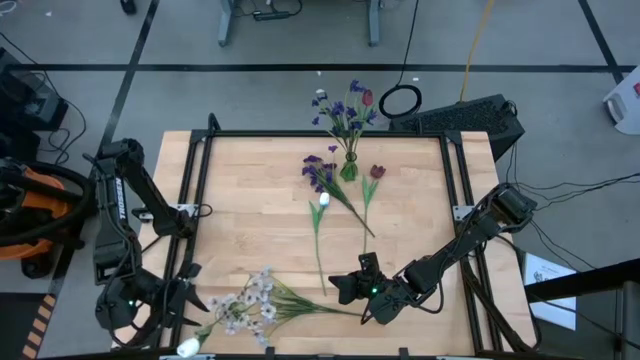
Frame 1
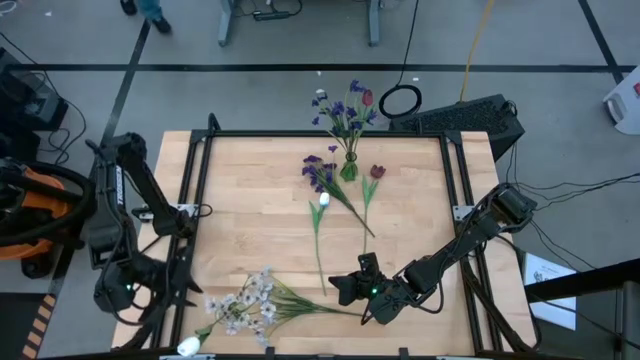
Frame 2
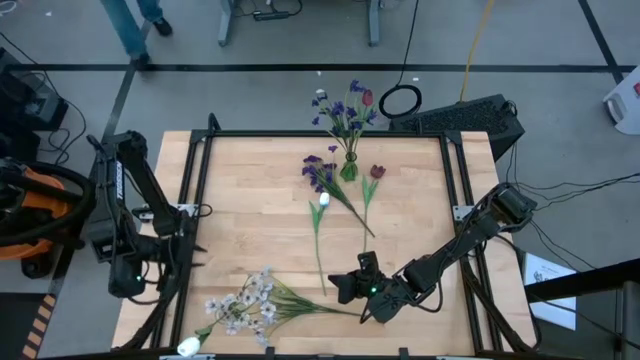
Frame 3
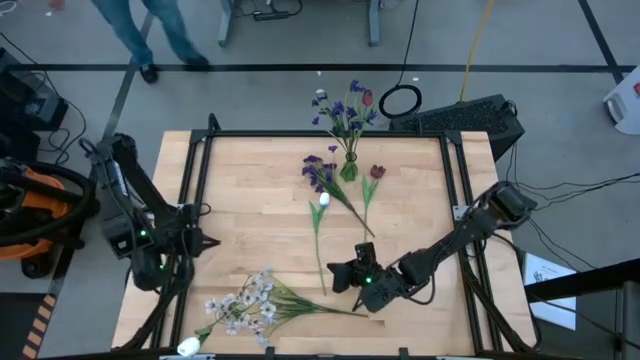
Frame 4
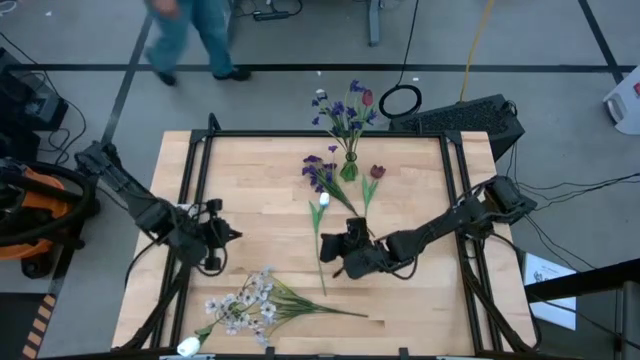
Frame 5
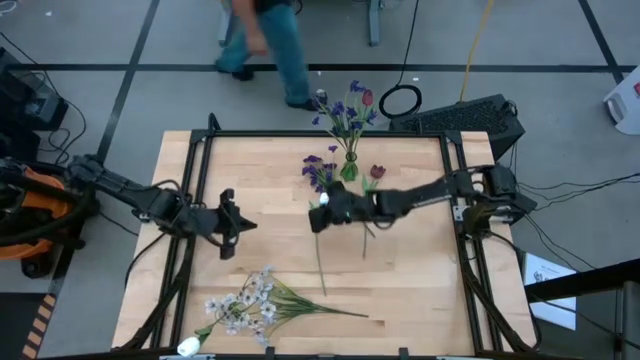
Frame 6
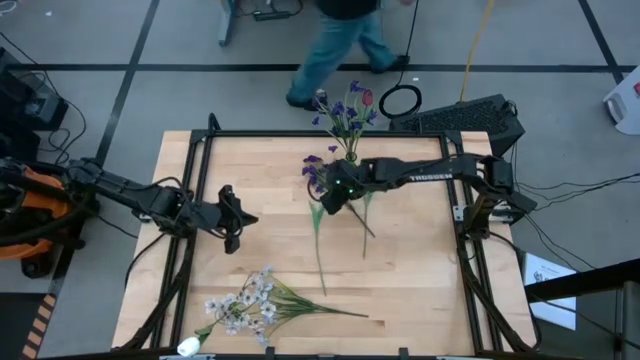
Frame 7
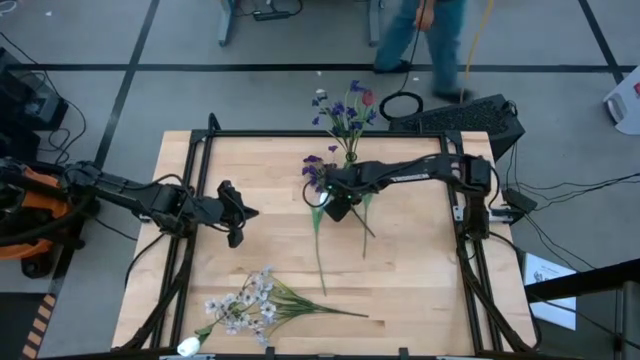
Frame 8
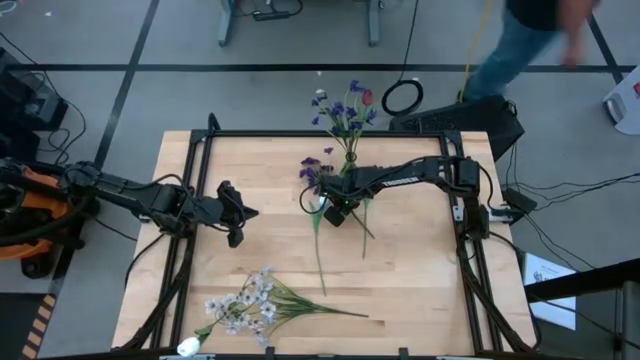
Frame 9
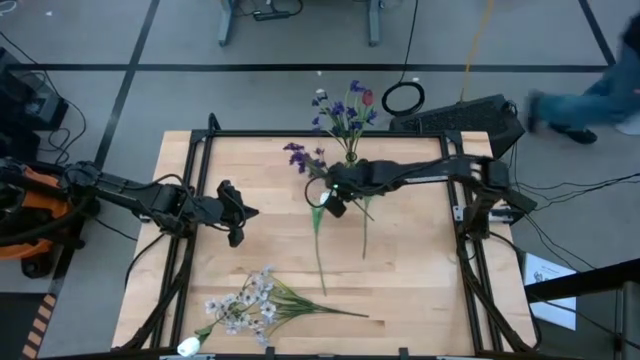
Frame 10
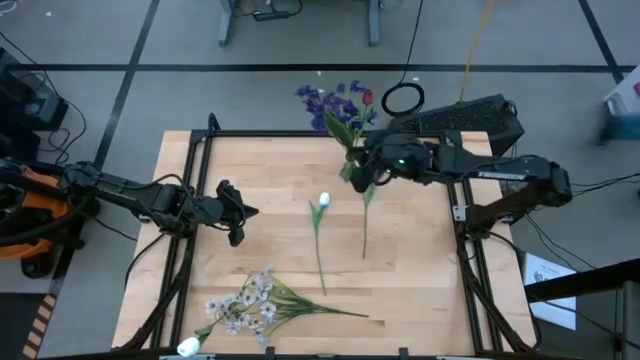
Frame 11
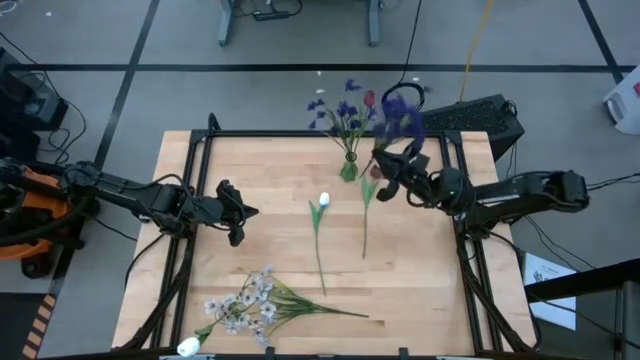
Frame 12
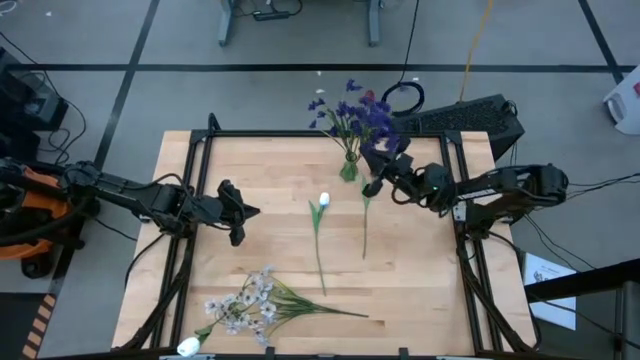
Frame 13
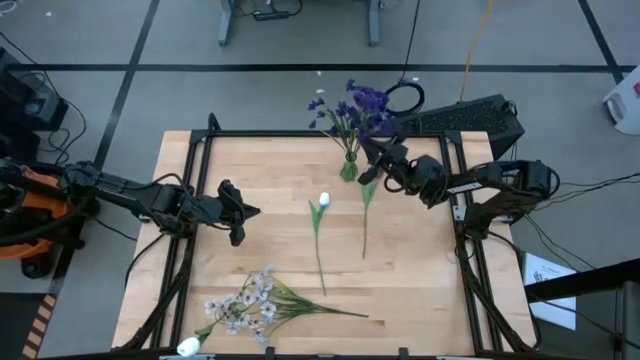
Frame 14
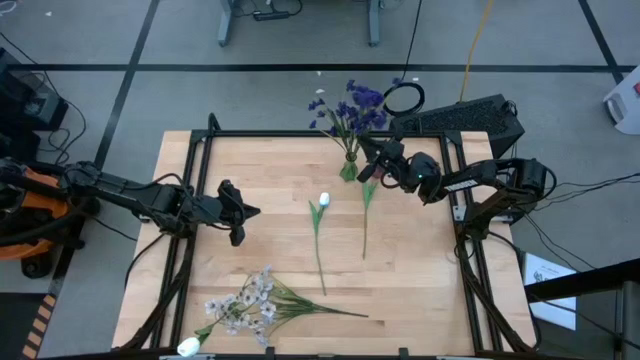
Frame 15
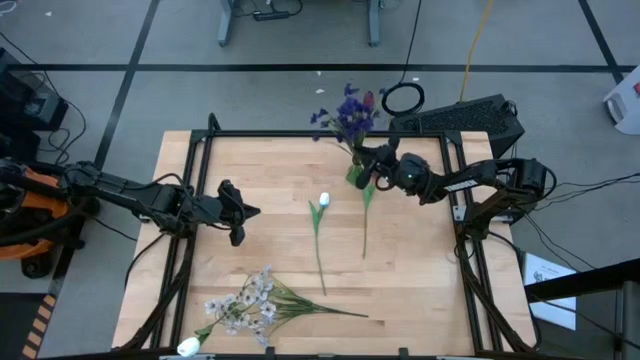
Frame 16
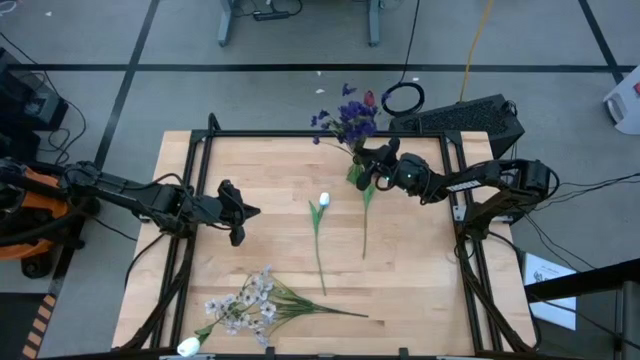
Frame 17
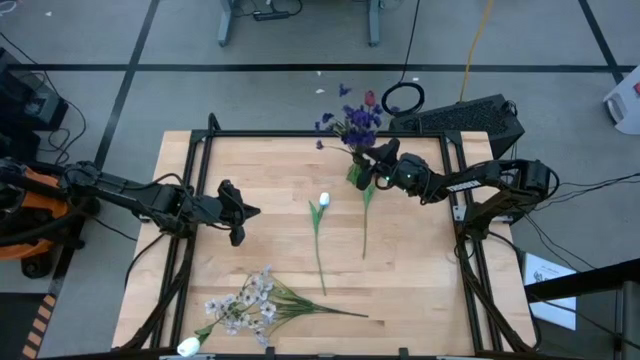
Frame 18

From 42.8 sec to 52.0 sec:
Task: Sort flowers into vase by color
Put the top violet flowers into the green flower vase

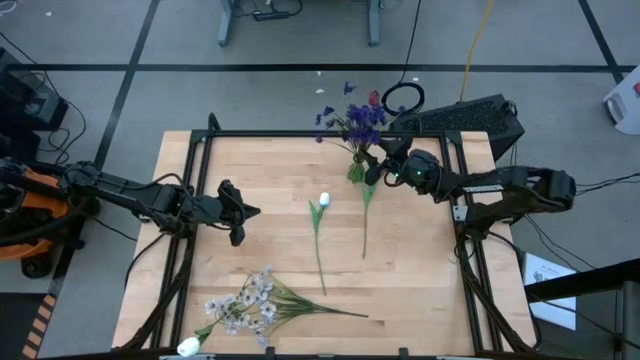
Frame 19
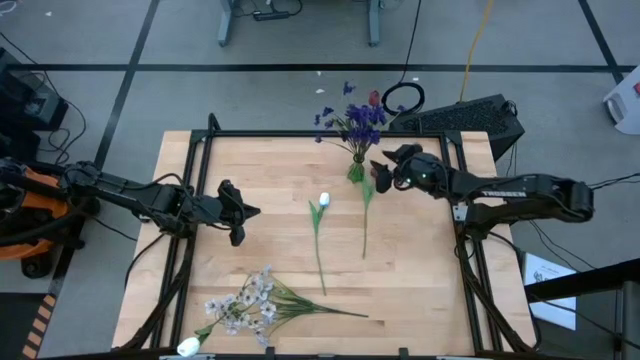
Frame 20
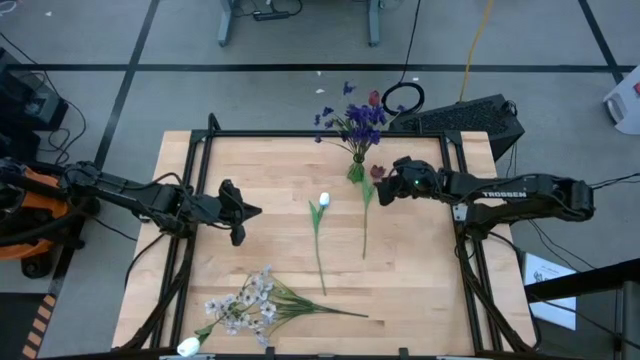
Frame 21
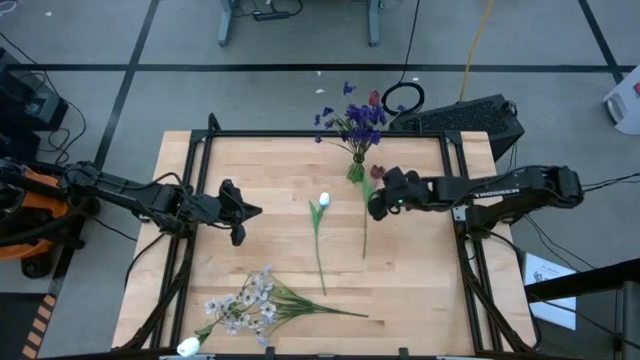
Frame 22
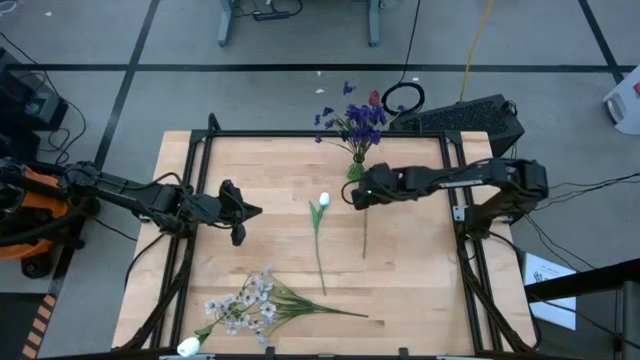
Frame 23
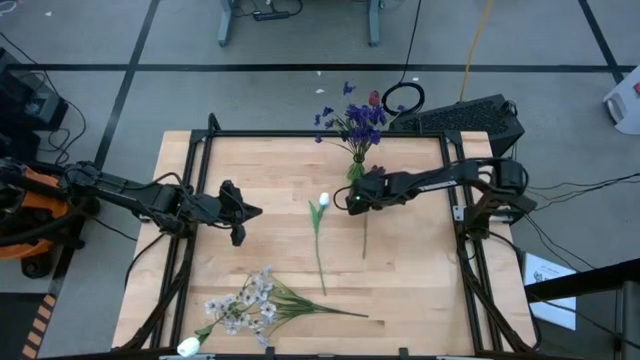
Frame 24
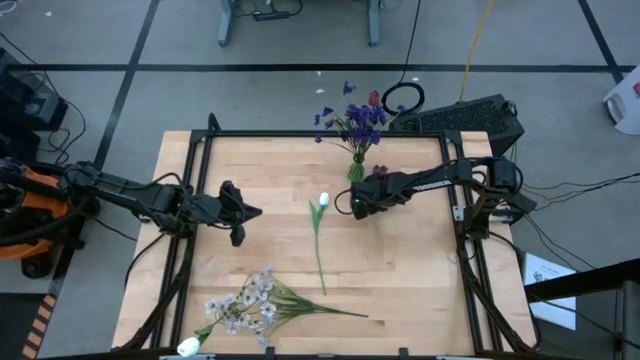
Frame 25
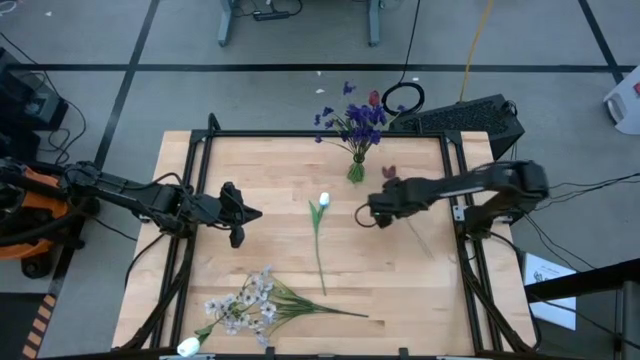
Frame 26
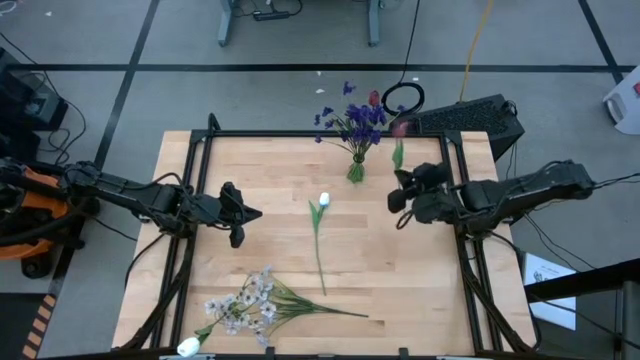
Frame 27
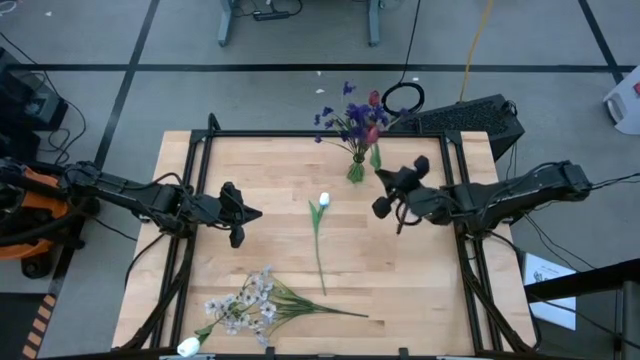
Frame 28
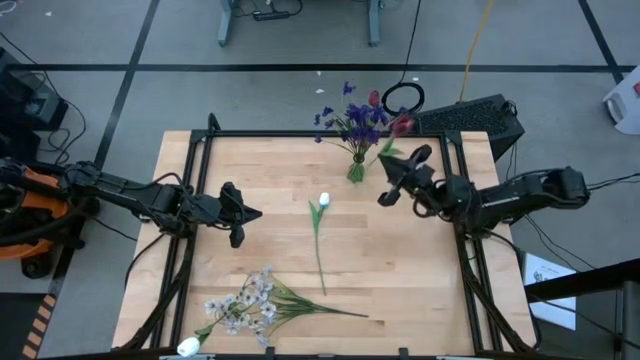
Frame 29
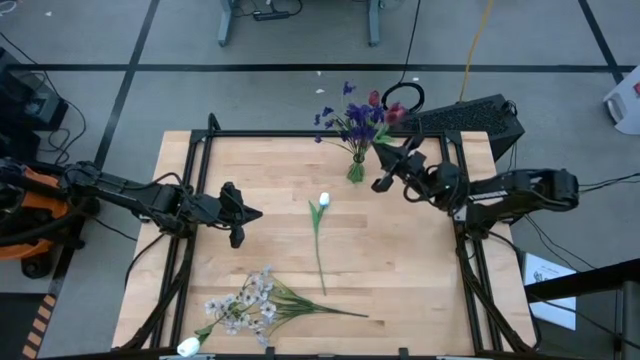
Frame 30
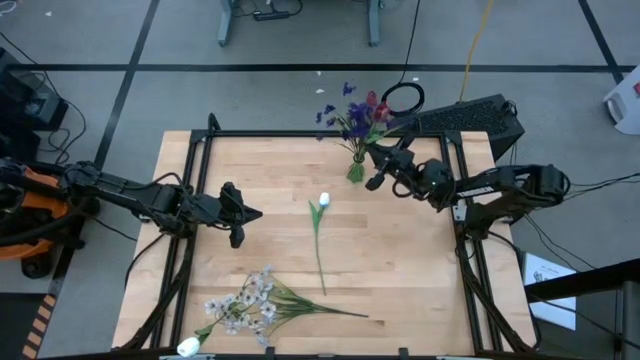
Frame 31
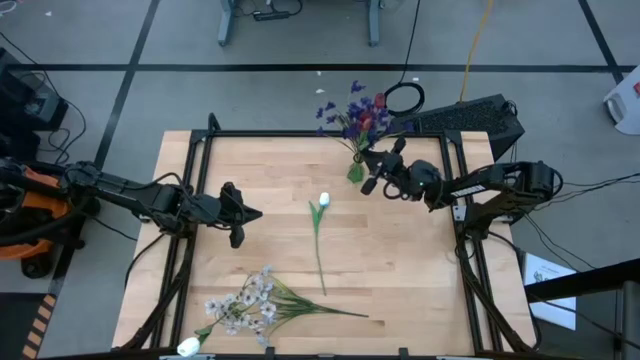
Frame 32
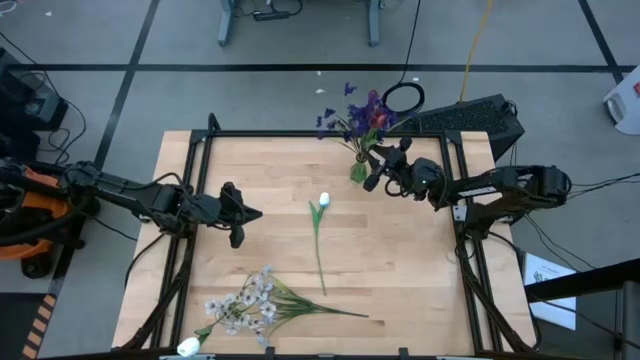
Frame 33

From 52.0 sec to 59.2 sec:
Put the right red tulip into the green flower vase

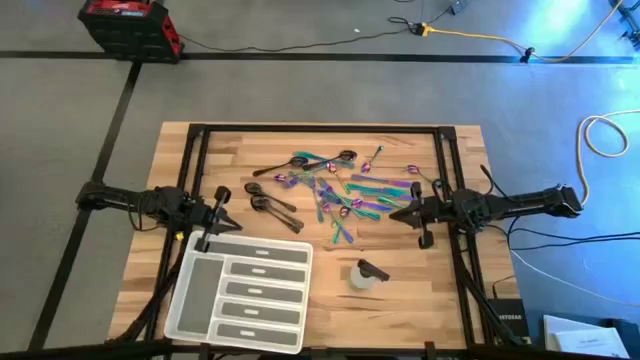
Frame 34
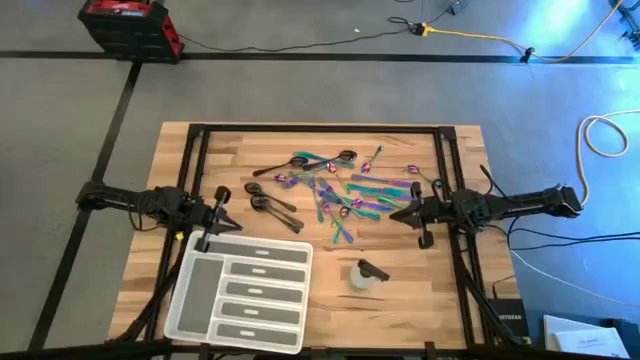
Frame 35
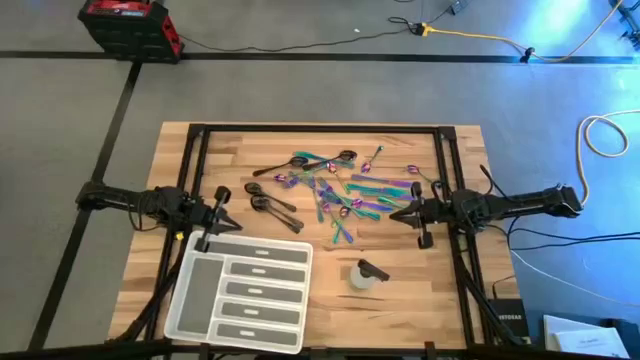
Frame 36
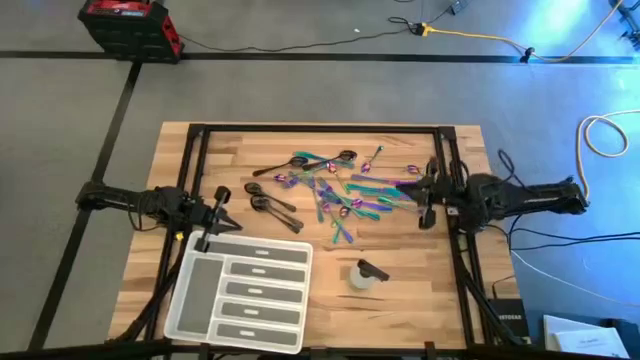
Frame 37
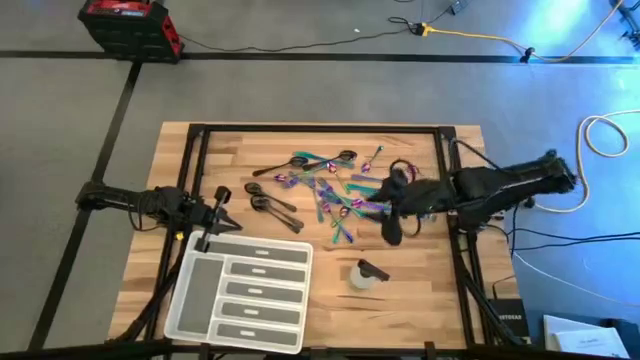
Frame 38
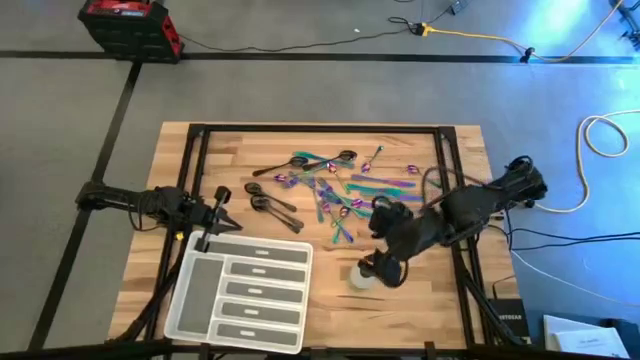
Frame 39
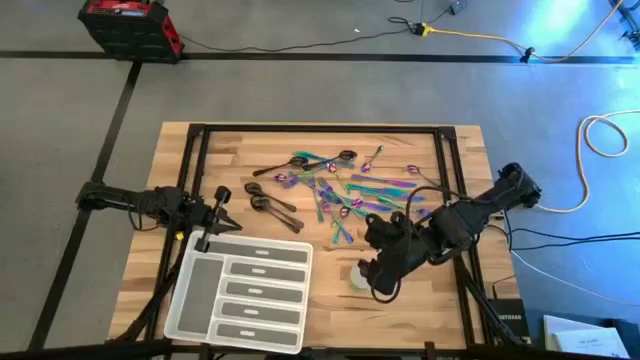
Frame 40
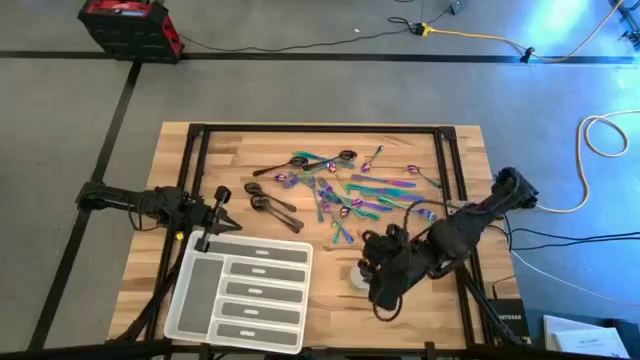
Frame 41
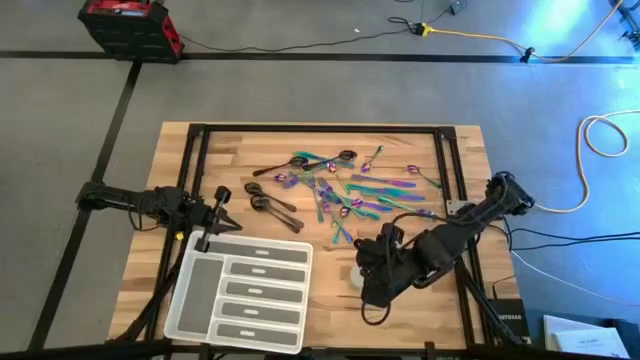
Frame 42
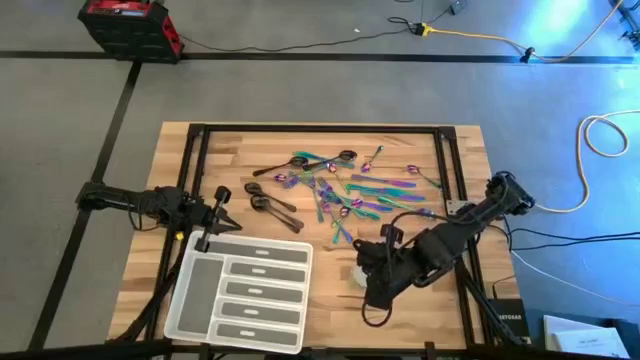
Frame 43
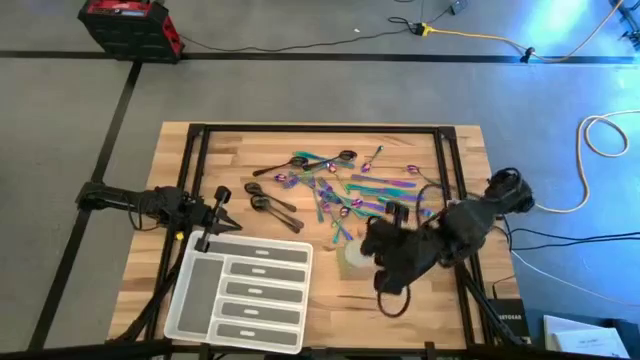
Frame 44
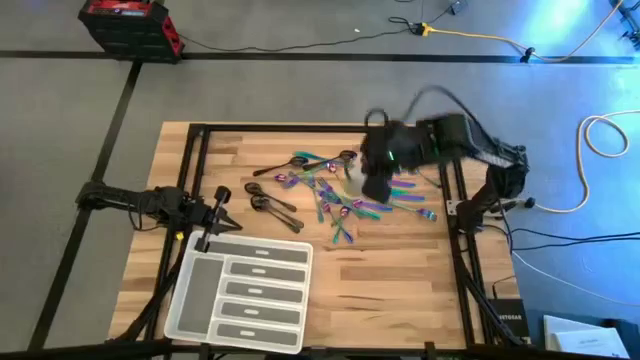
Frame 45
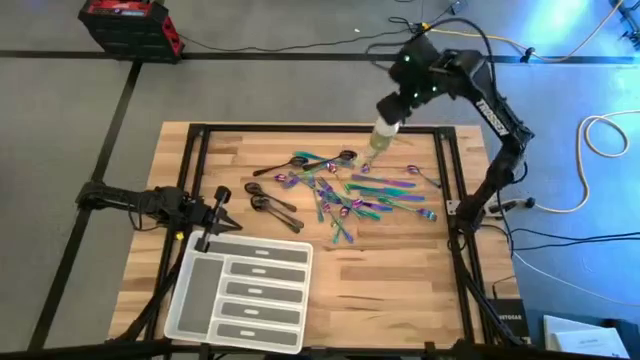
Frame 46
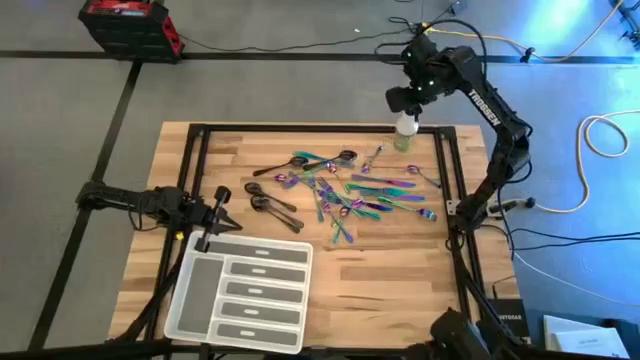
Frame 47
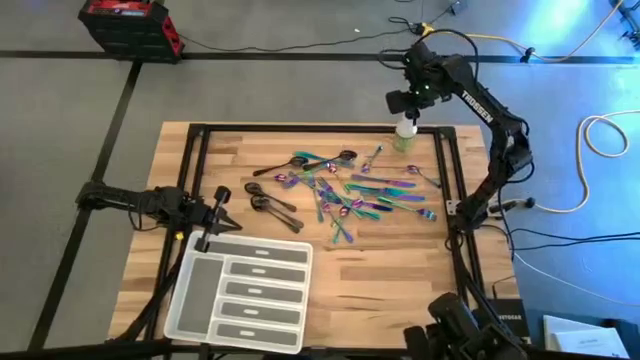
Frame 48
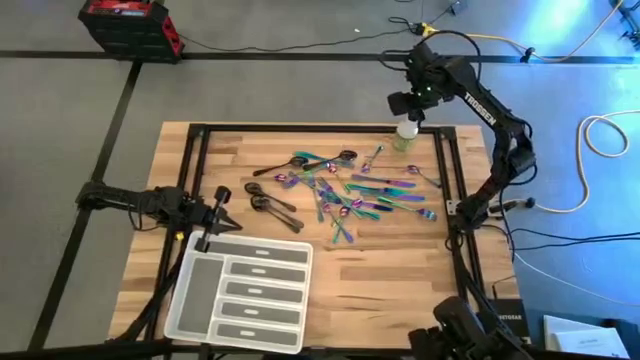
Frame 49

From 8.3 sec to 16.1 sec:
Task: Sort silverware
Move the white spray bottle to the top right of the table
